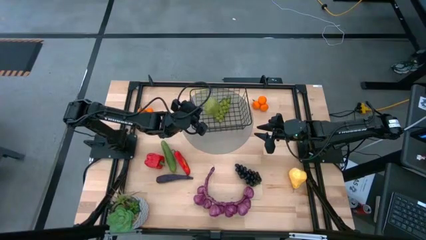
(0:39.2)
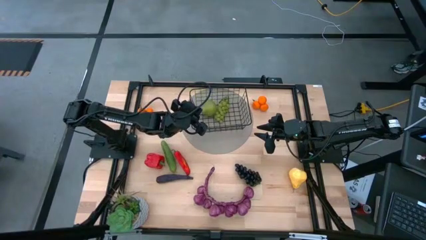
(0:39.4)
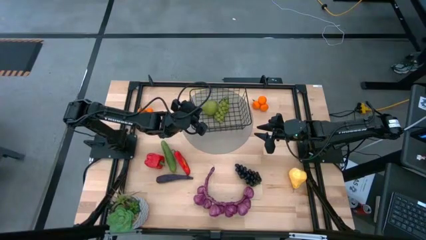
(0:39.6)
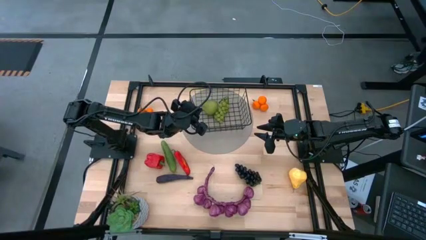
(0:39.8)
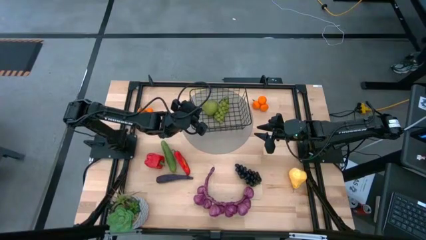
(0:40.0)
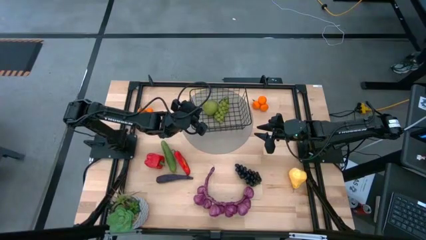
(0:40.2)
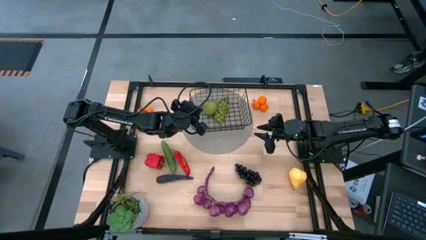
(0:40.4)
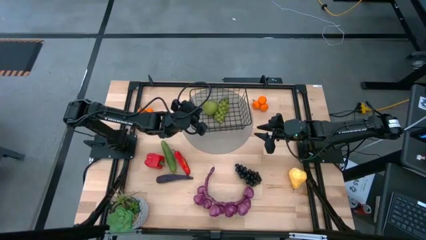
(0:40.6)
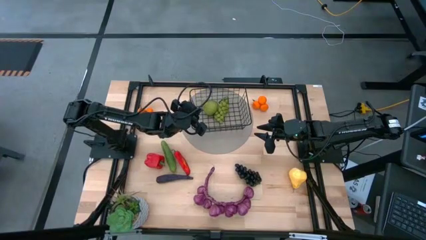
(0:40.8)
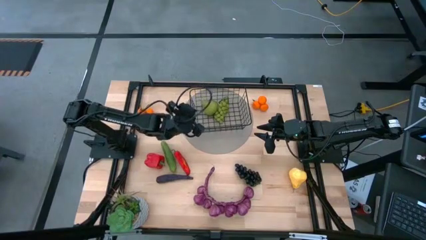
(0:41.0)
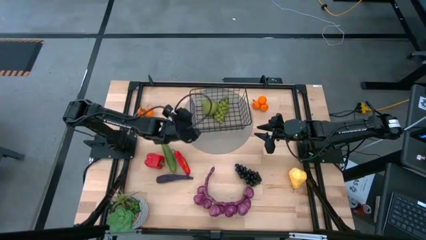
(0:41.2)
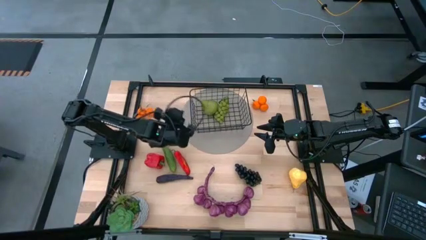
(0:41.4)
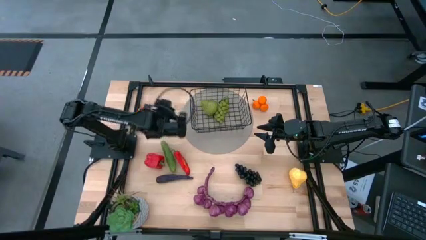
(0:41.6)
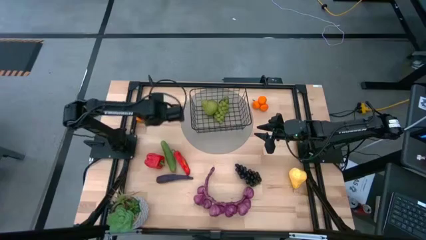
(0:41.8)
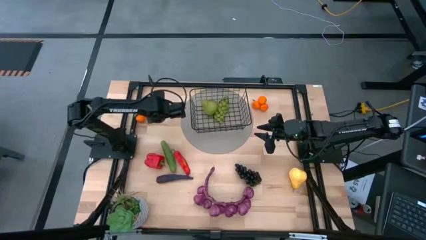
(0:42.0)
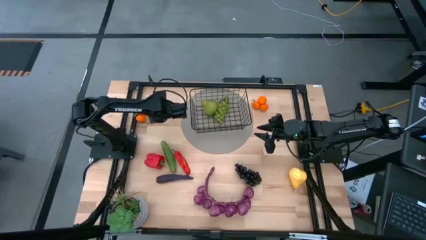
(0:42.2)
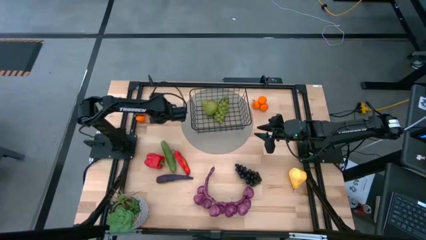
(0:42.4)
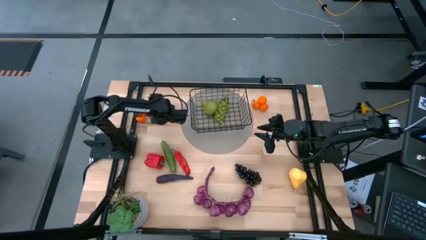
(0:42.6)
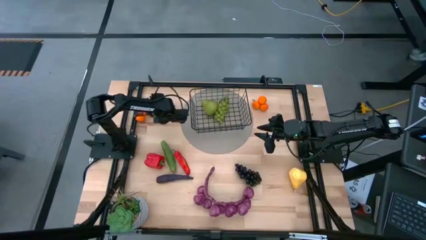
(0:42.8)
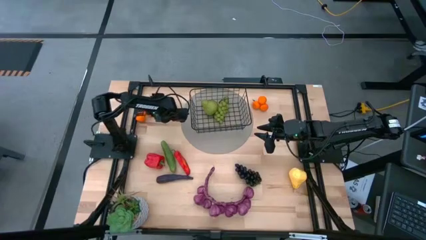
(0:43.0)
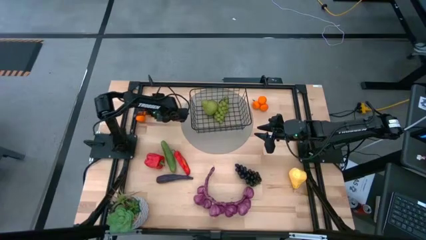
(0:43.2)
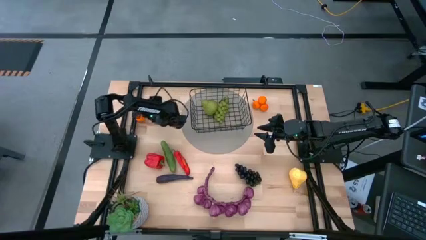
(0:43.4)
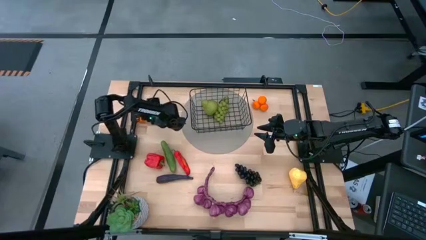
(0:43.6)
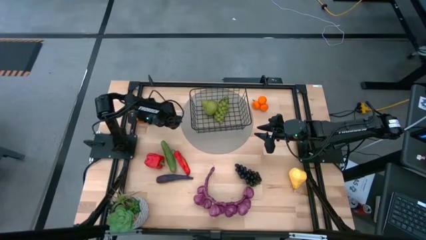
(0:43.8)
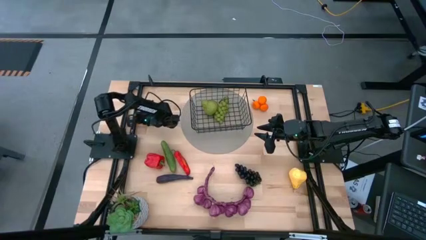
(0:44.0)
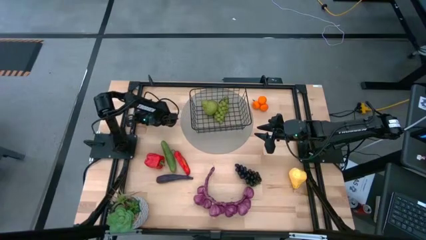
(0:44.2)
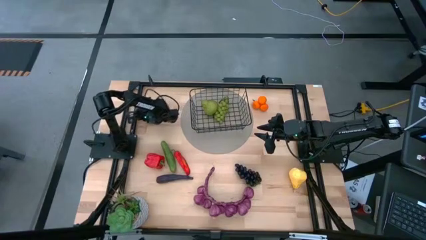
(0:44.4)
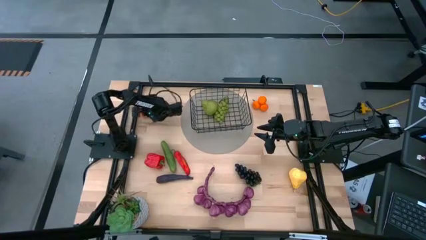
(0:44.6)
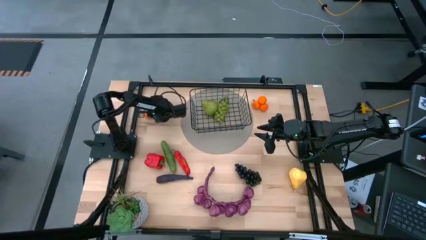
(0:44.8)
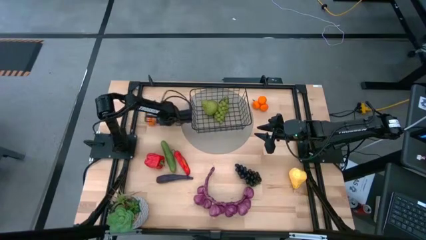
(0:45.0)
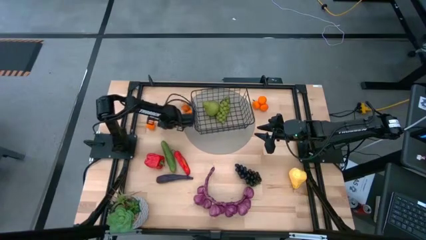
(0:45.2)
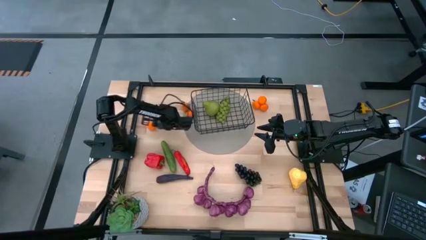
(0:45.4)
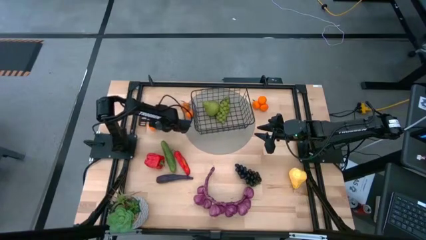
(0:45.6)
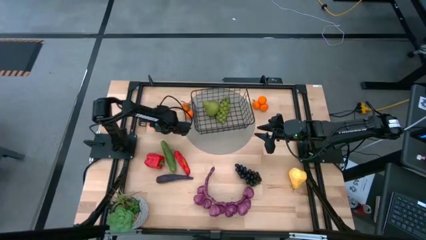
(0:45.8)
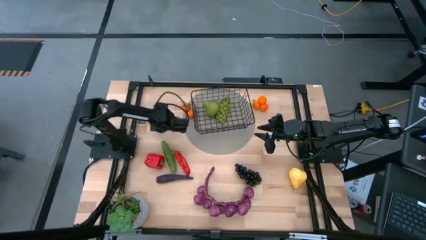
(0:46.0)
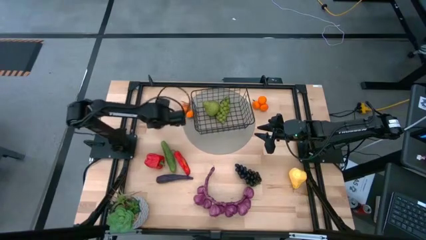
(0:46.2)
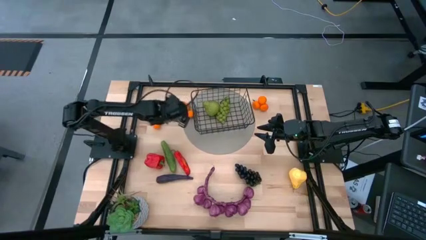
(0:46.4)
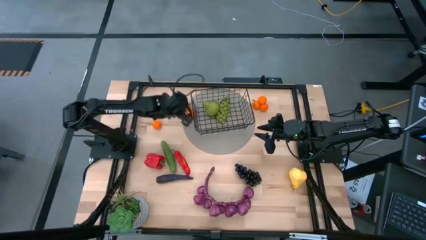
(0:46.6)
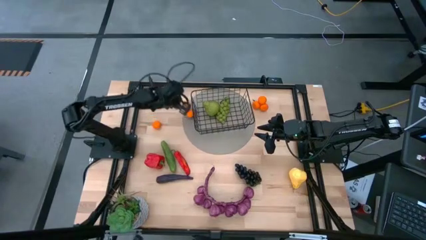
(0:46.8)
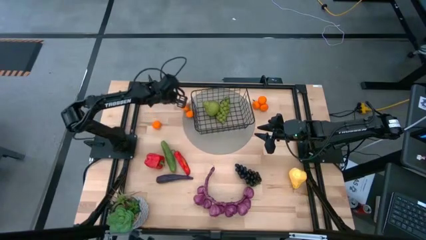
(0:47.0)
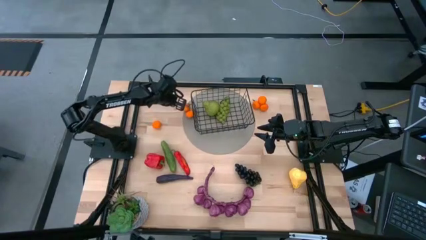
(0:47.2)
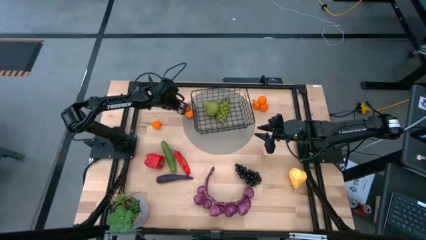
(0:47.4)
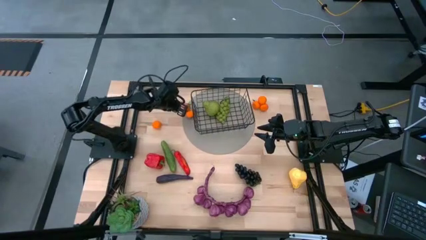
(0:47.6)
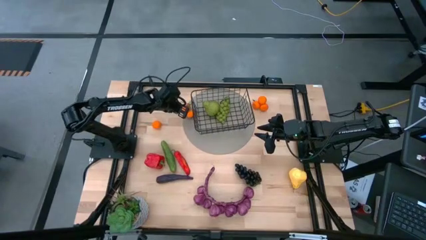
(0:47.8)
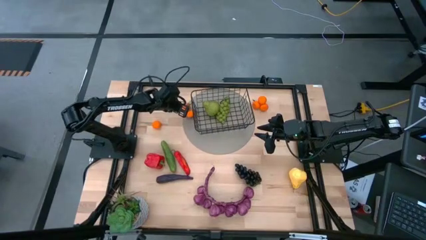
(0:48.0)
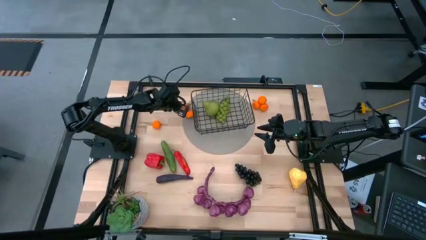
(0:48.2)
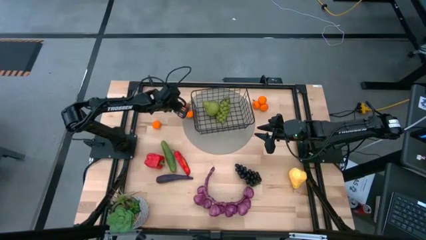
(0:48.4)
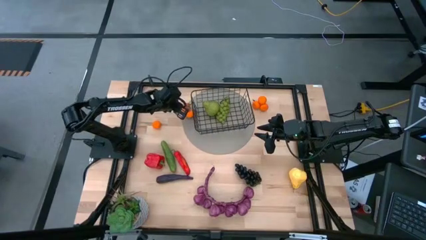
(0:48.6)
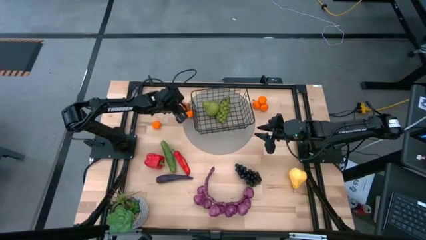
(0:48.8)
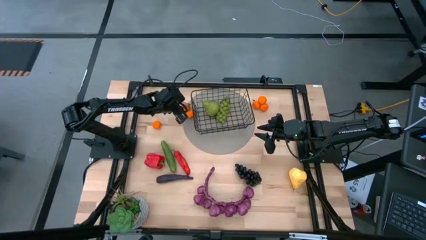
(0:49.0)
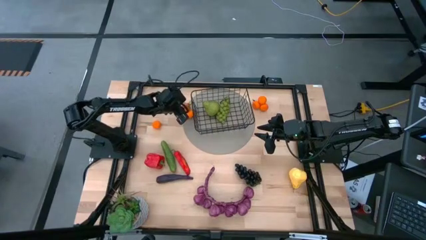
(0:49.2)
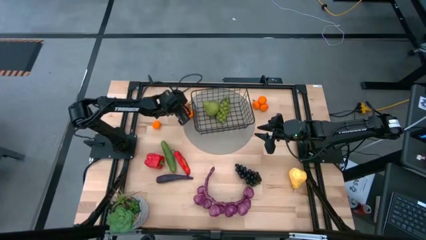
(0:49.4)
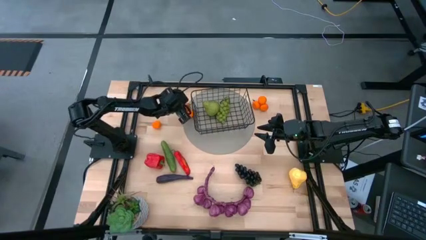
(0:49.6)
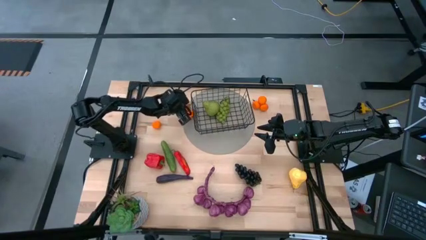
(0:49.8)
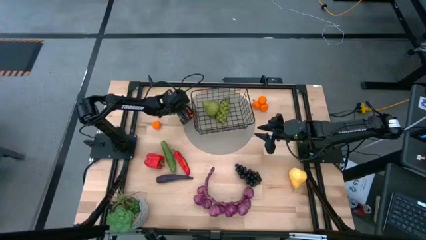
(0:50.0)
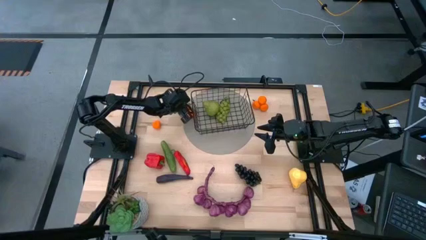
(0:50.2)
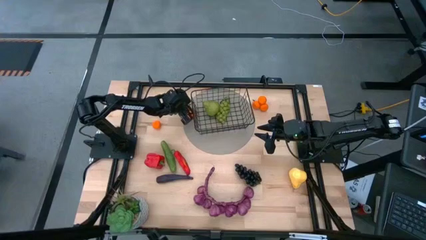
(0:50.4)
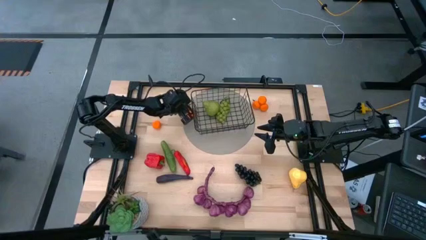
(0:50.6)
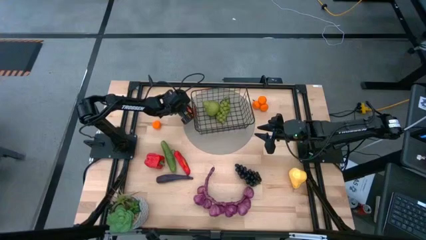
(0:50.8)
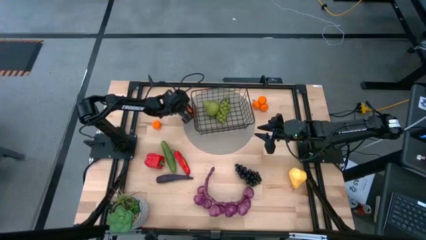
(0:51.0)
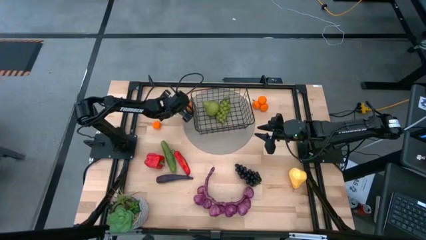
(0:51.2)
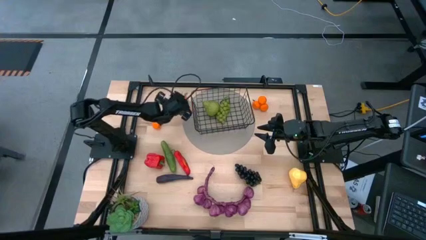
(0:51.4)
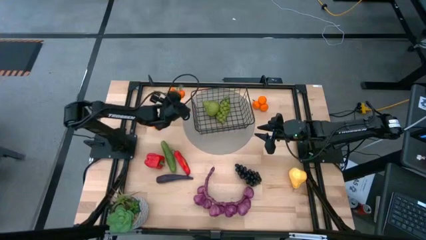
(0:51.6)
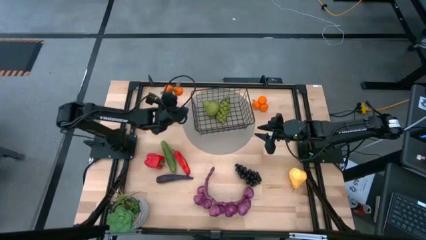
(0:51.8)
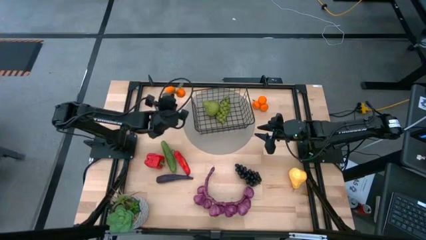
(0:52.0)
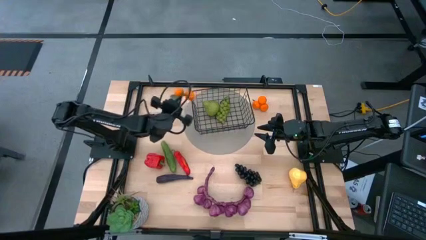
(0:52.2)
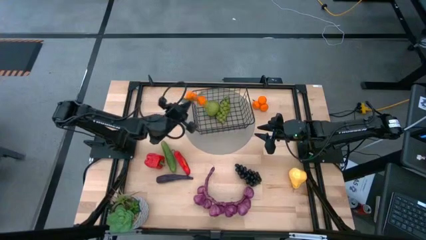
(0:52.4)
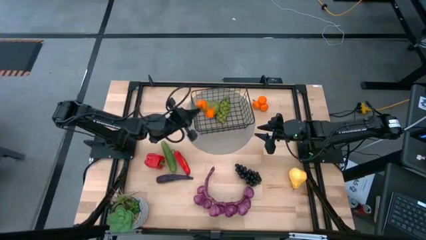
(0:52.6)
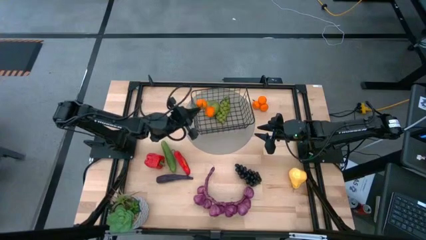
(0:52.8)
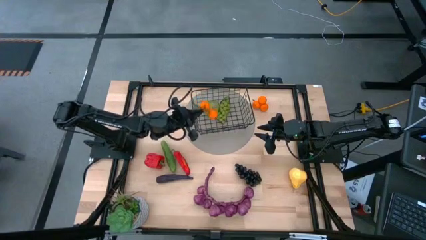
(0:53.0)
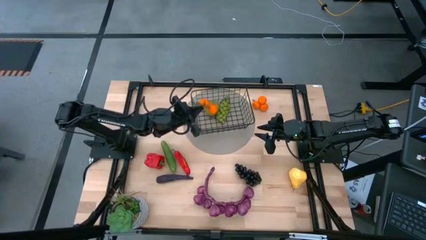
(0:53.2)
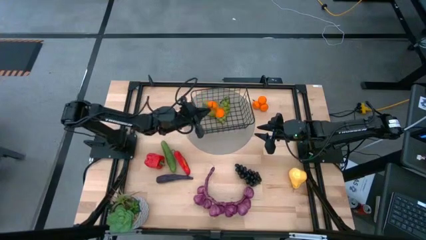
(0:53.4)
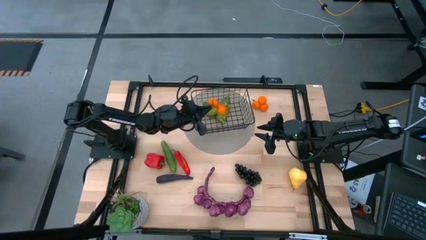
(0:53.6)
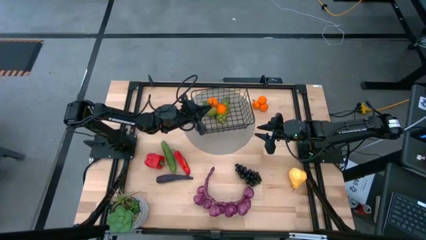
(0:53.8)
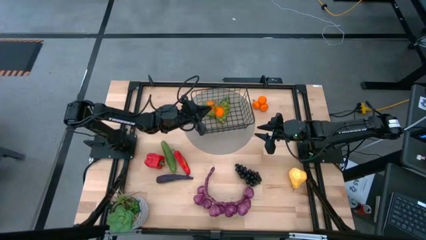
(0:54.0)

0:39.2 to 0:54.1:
Task: Build produce basket
Put the left tangerine into the black wire basket

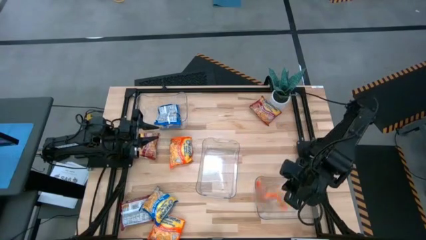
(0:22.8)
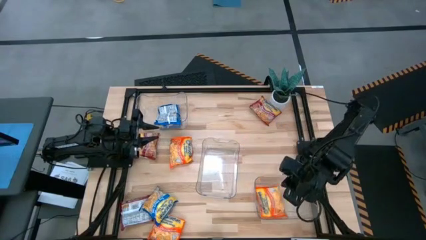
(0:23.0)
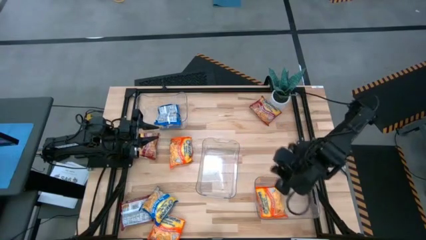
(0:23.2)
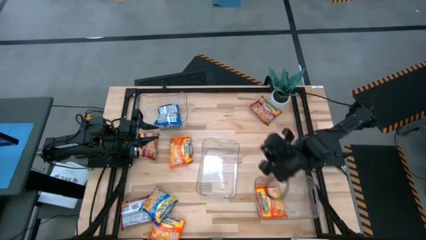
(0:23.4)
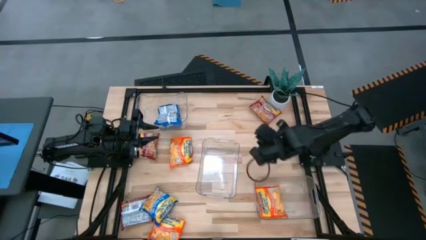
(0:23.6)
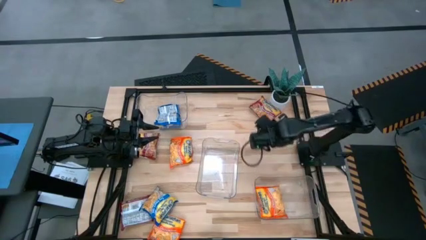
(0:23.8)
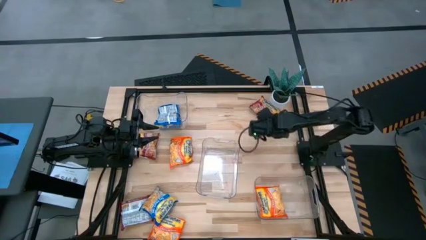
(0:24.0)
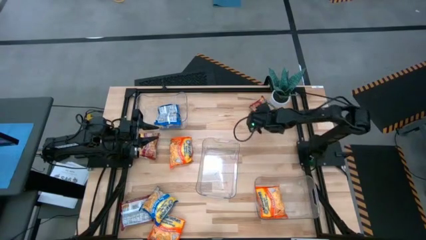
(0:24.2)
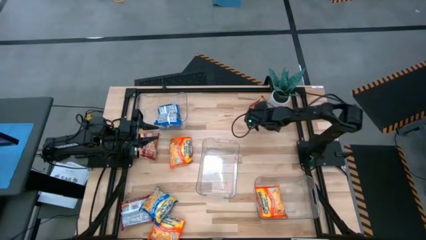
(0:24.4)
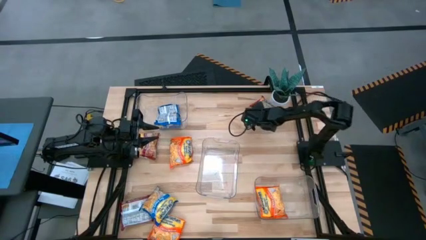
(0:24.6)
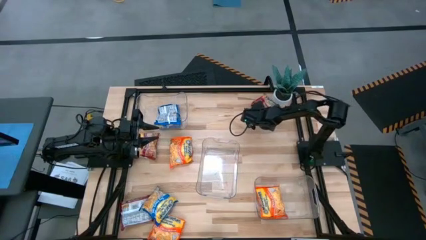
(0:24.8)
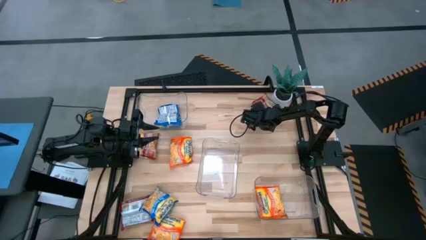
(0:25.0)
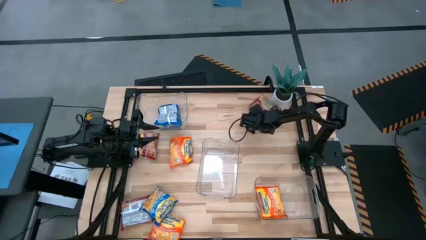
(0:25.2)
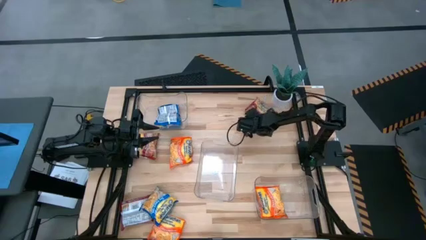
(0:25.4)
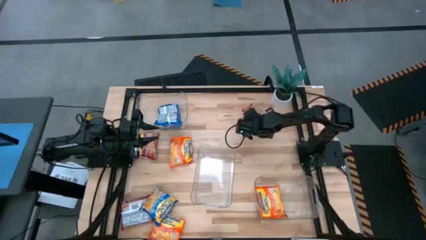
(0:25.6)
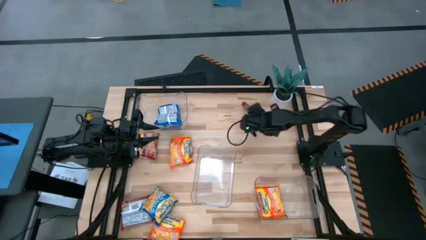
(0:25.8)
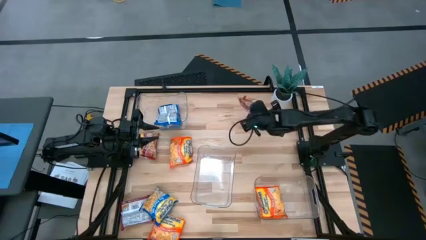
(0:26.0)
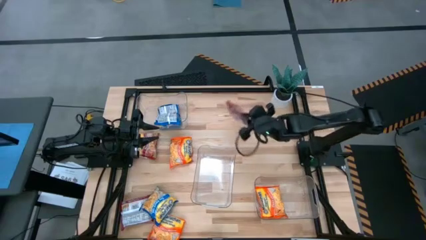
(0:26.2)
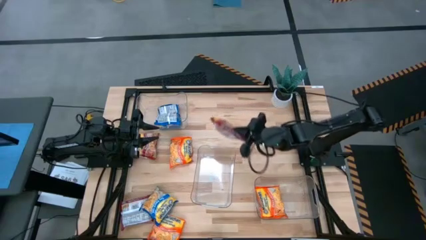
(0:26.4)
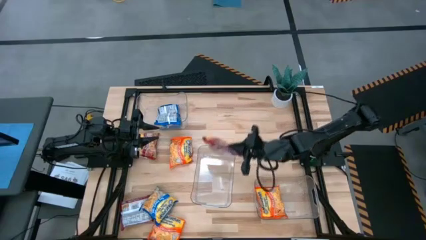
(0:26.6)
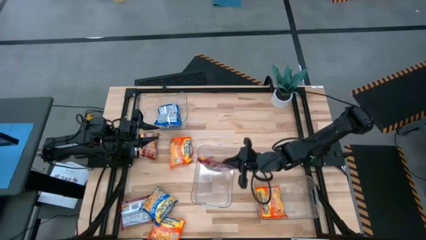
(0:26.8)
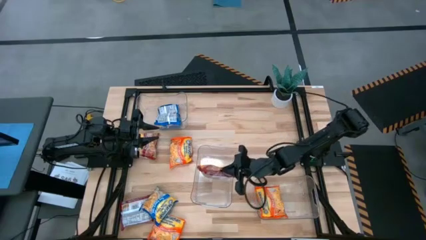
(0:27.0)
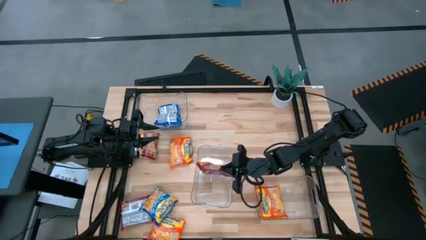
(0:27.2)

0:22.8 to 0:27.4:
Task: Sort Maruchan noodles
Put the top red noodle pack into the middle transparent bin
